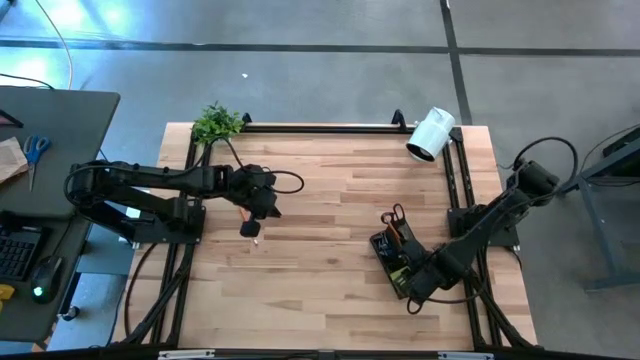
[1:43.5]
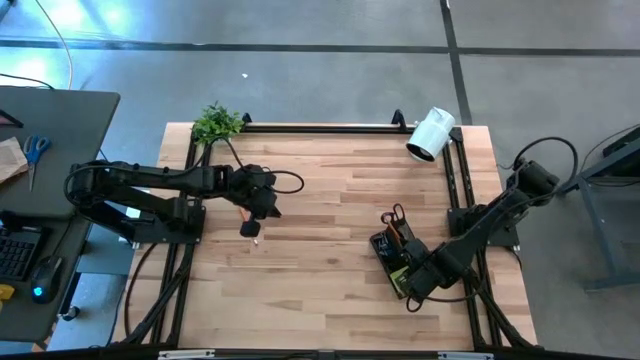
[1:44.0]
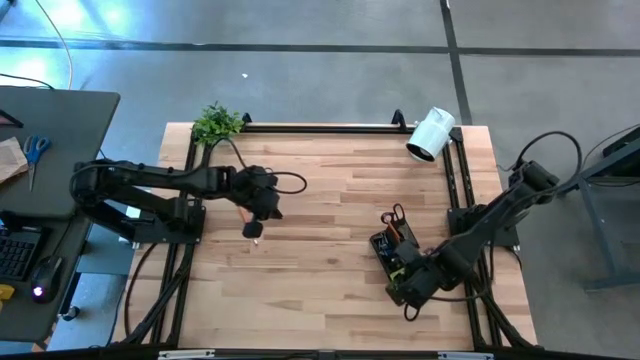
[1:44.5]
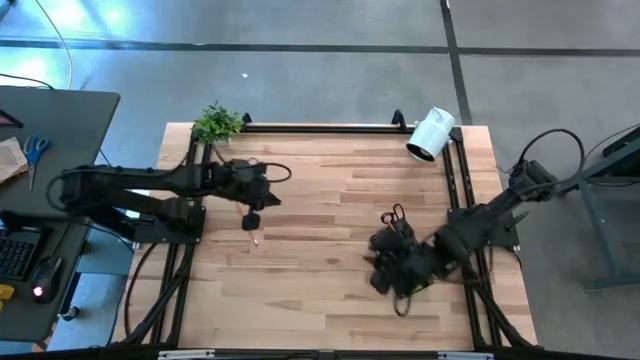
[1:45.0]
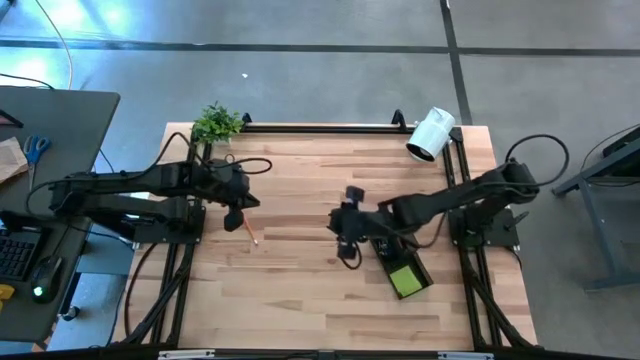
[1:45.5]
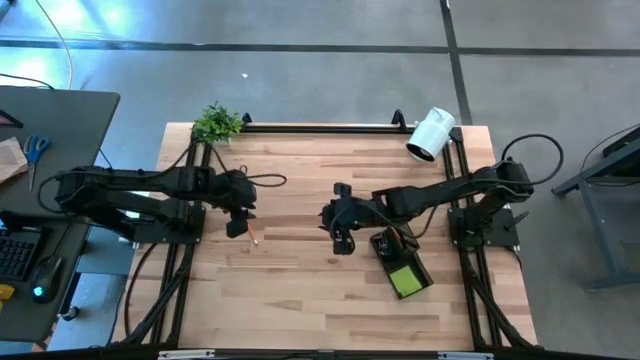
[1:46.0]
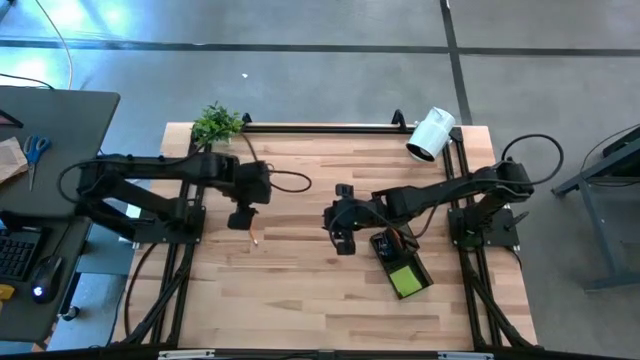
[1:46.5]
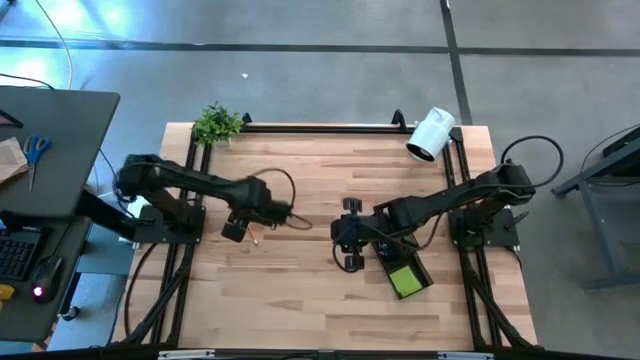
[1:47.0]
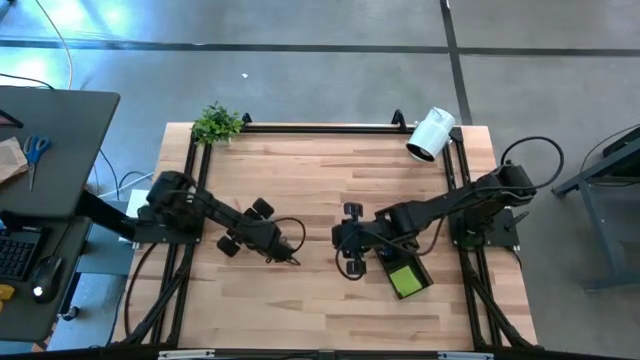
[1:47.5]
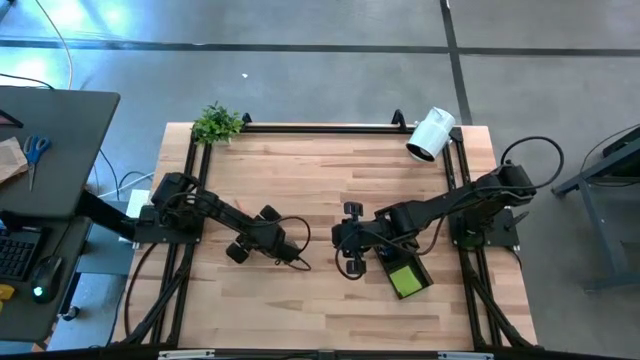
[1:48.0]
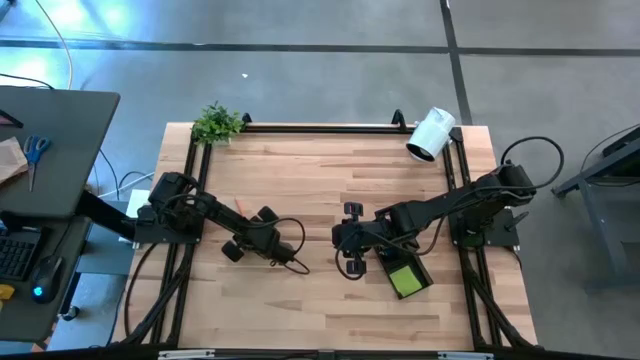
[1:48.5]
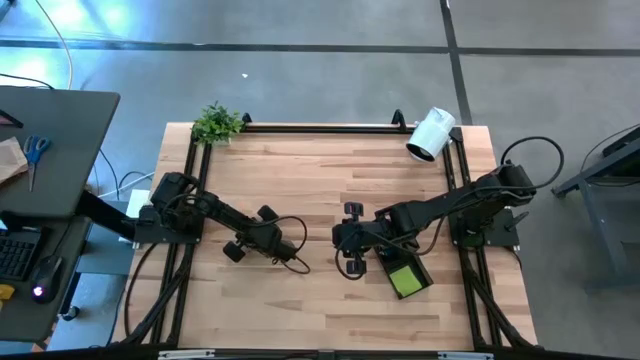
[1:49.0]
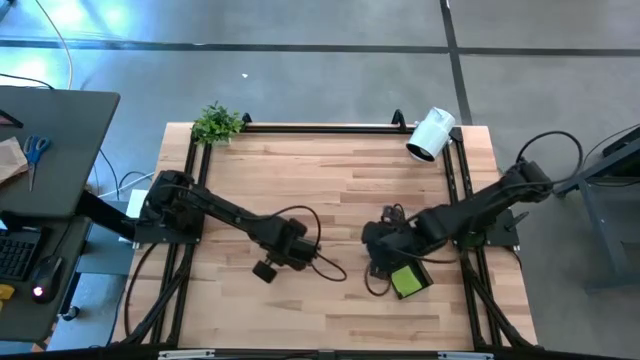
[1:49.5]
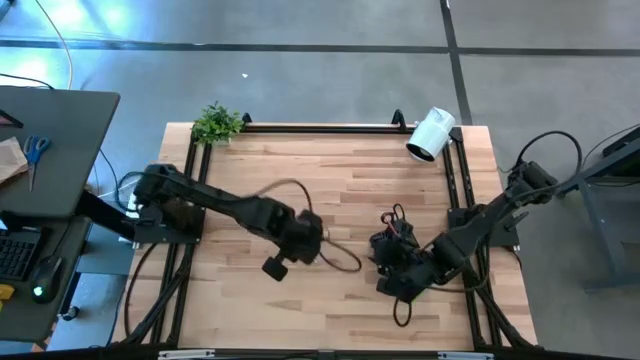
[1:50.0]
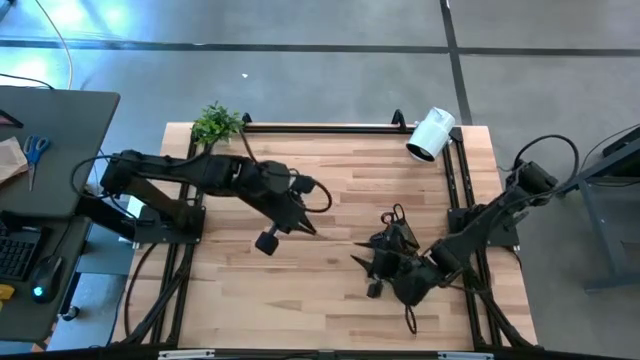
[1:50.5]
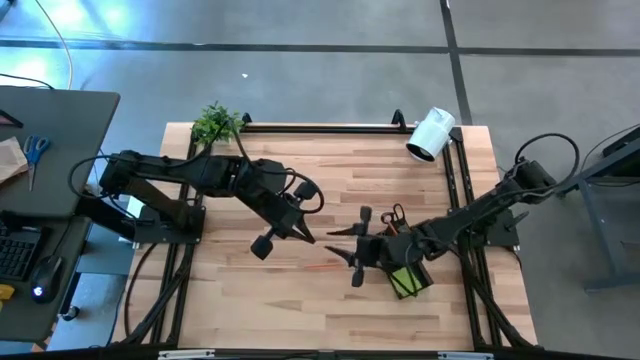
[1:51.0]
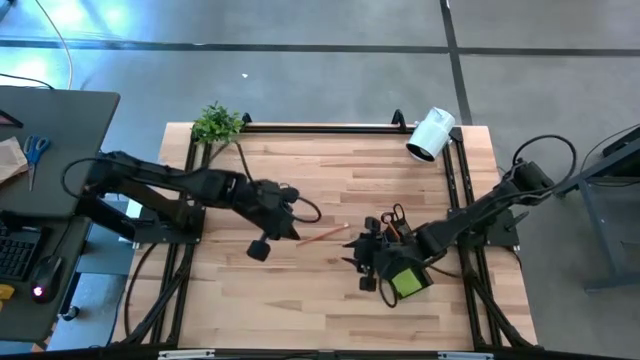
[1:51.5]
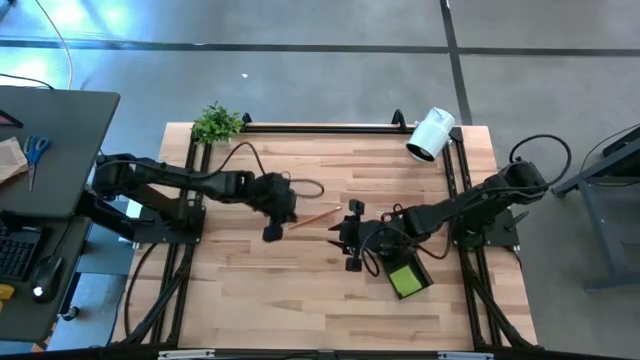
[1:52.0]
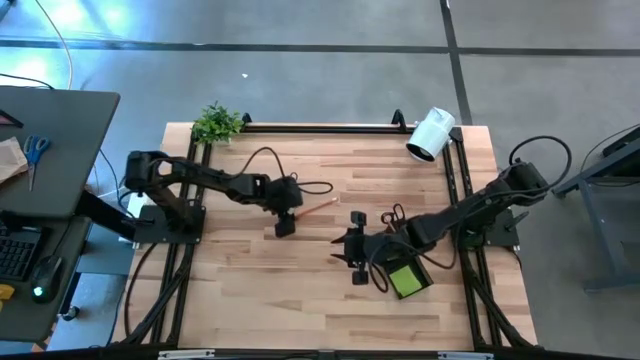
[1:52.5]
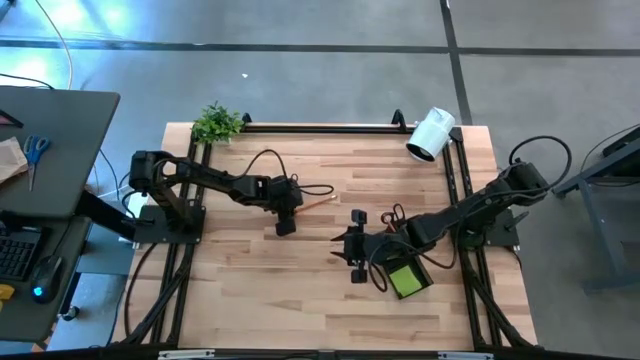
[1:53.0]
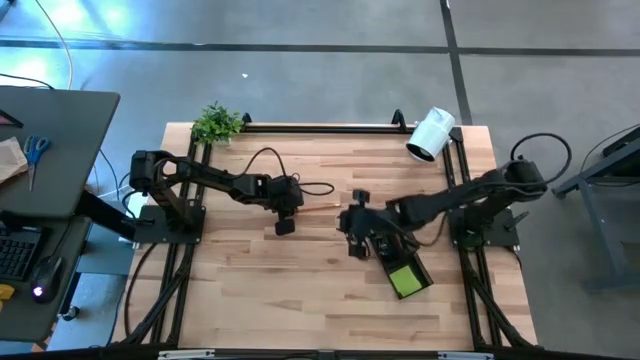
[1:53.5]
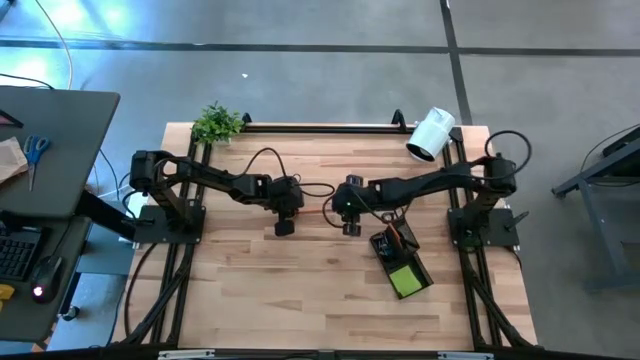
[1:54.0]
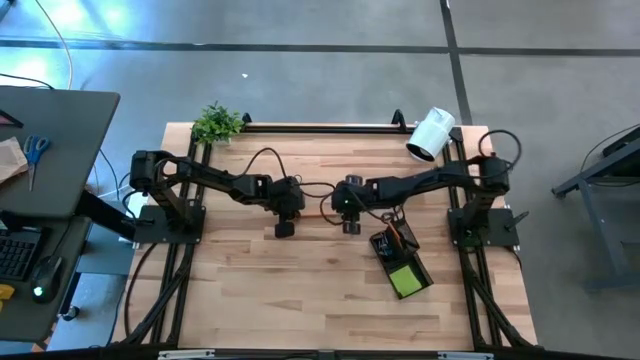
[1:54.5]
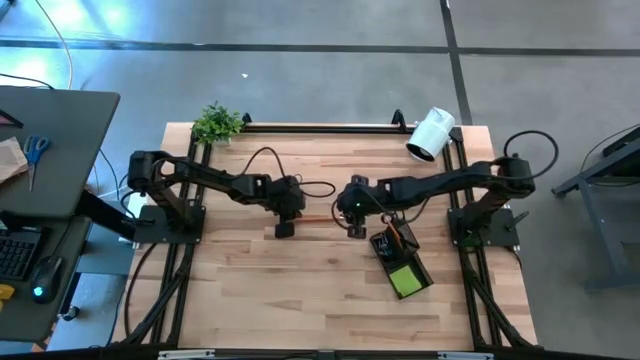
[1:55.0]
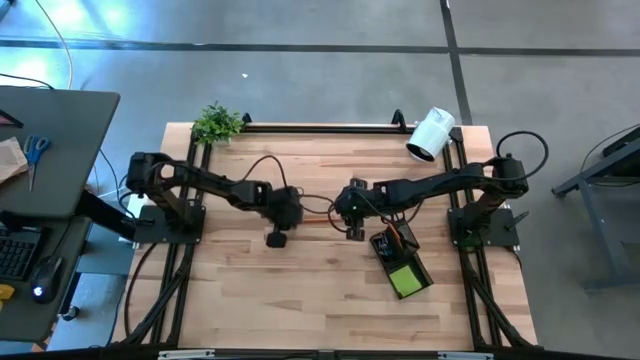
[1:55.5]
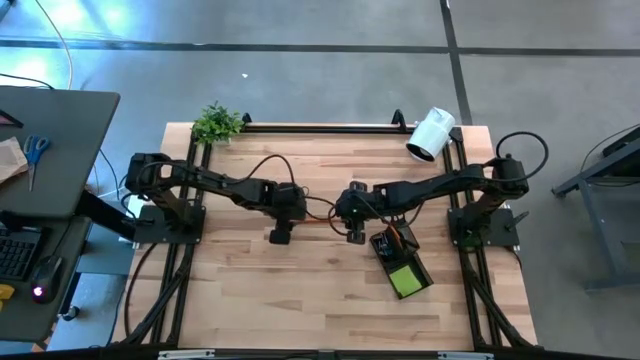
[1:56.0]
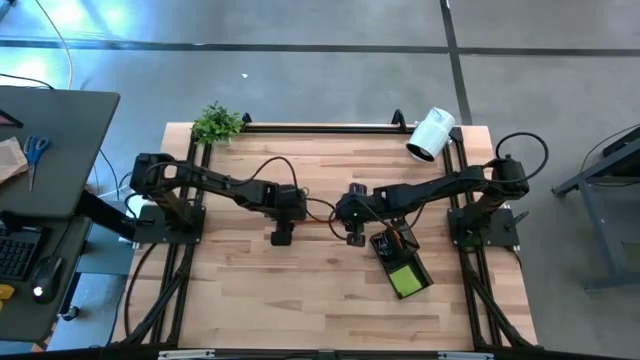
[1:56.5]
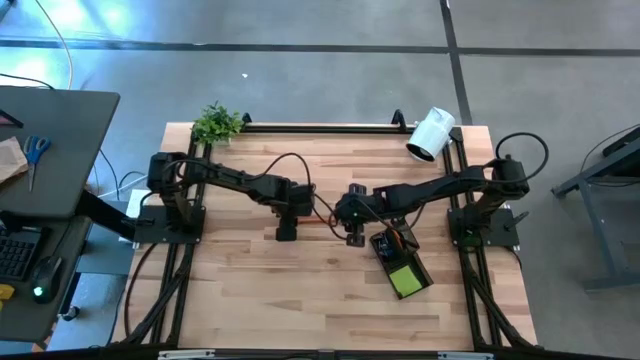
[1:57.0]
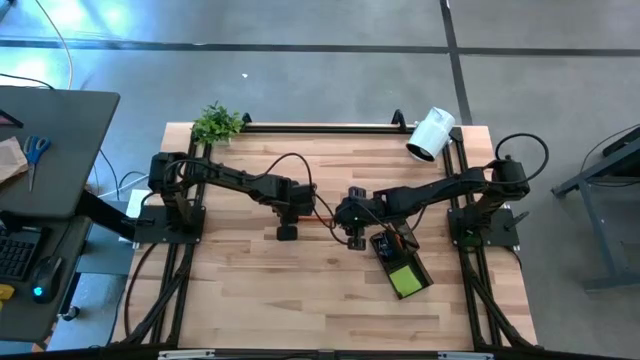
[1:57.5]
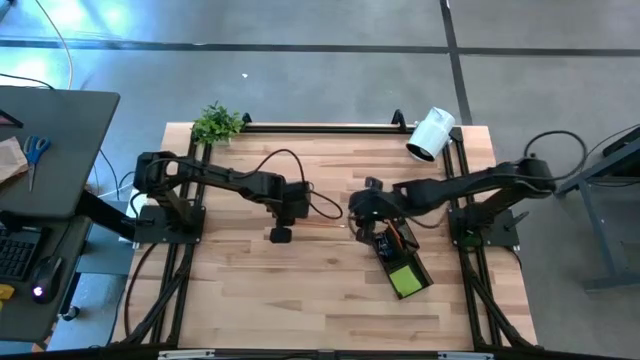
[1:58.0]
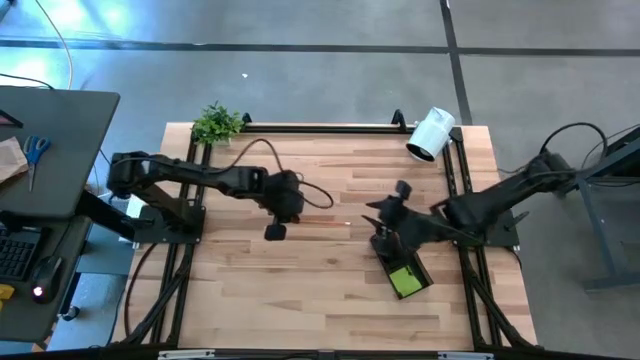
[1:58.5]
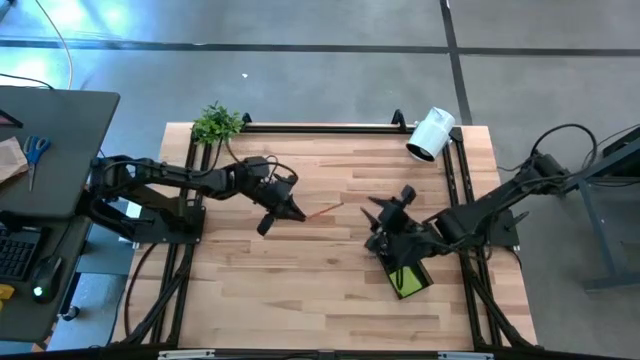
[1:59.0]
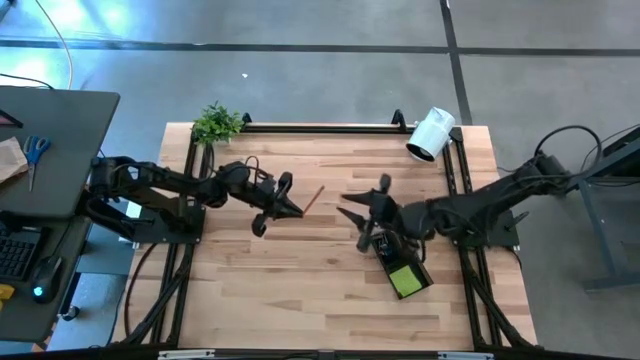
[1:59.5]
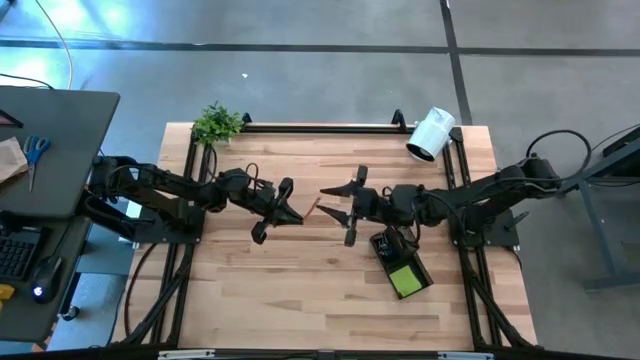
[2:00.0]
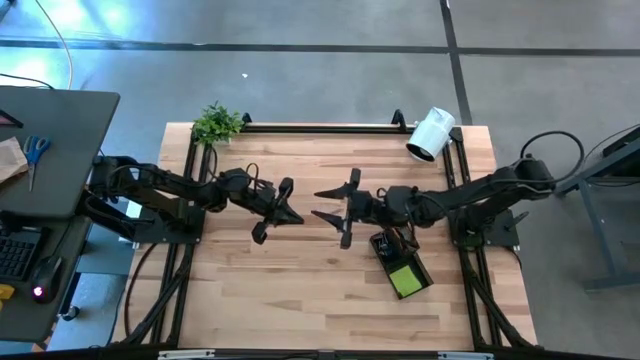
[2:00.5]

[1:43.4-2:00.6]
Task: Pick and place office supplies into organizer
Put the orange pencil into the black desk organizer

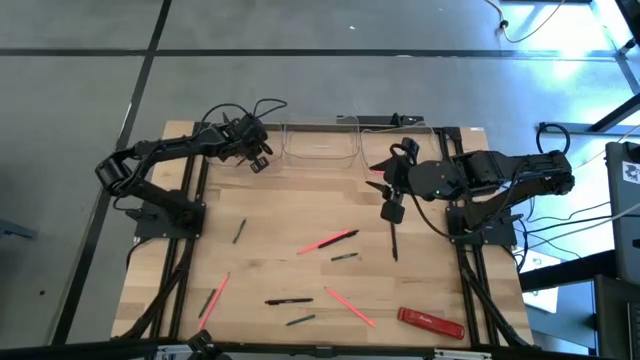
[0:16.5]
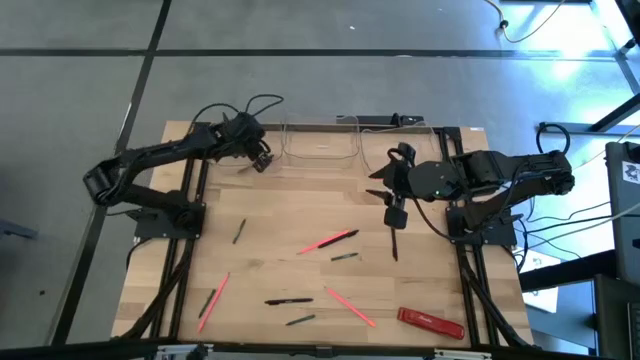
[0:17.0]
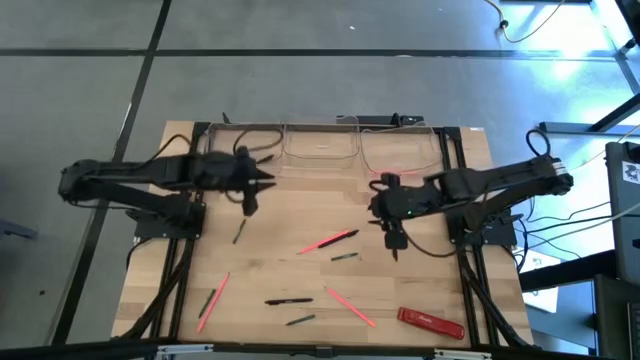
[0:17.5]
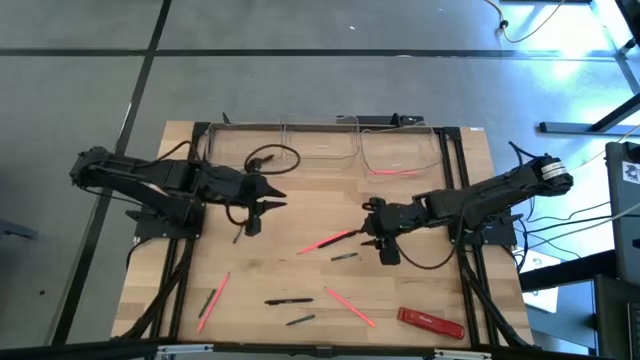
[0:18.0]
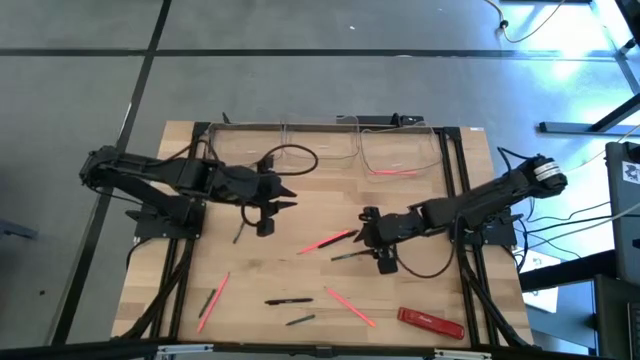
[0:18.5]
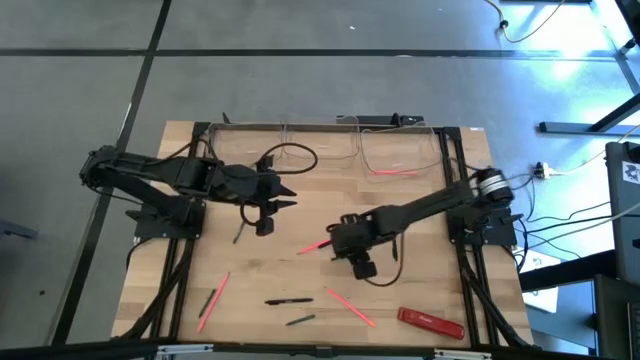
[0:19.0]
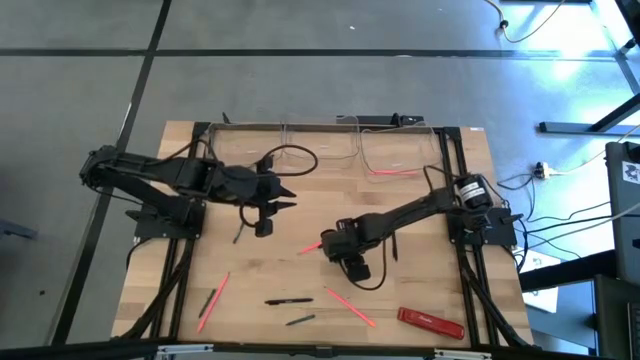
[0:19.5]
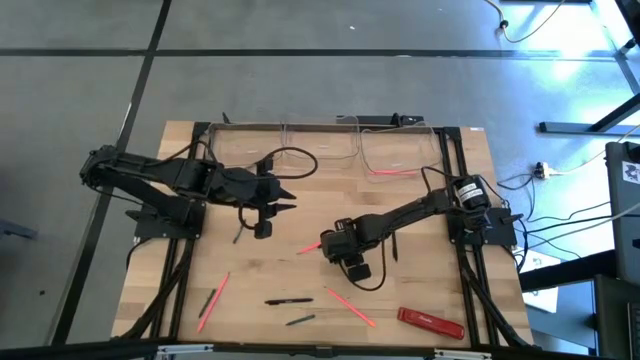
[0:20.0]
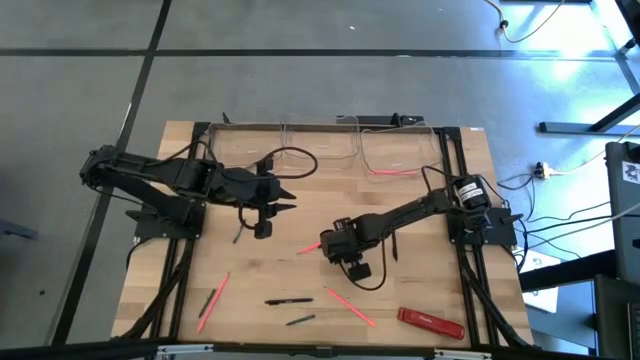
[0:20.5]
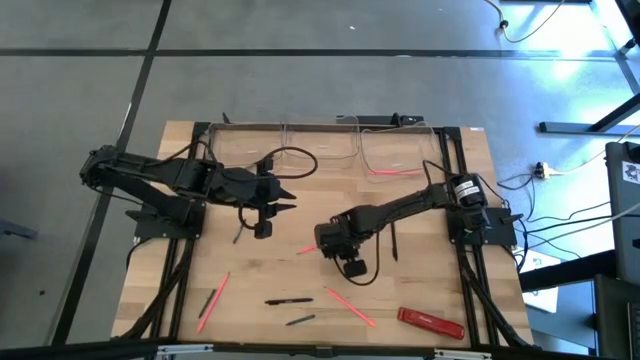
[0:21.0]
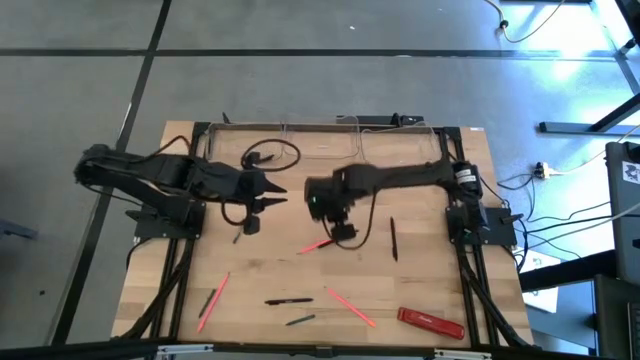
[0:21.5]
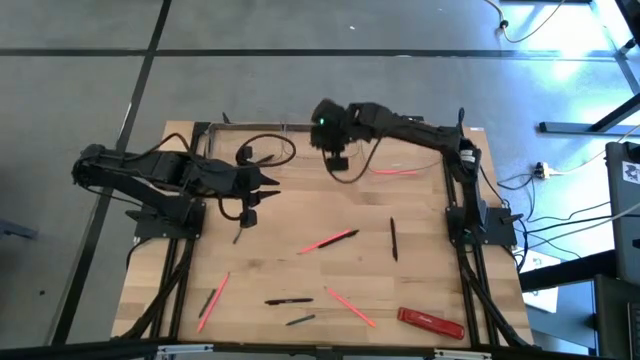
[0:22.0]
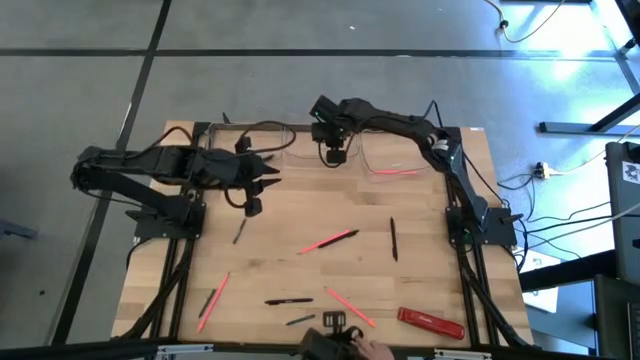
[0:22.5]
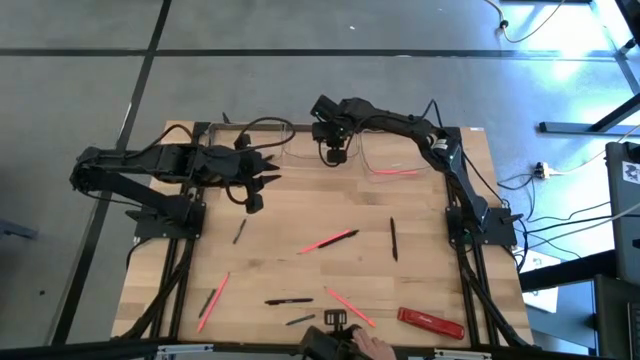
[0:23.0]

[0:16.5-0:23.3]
Task: Sort crayons/erasers/pens/pencils in bins
Put the green crayon into the middle transparent bin
